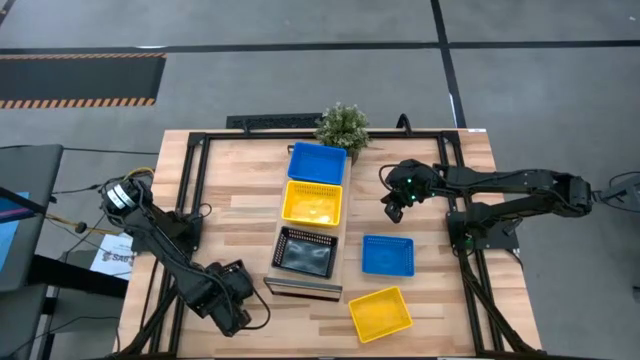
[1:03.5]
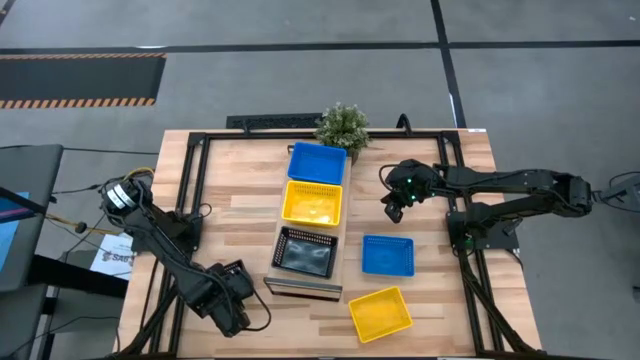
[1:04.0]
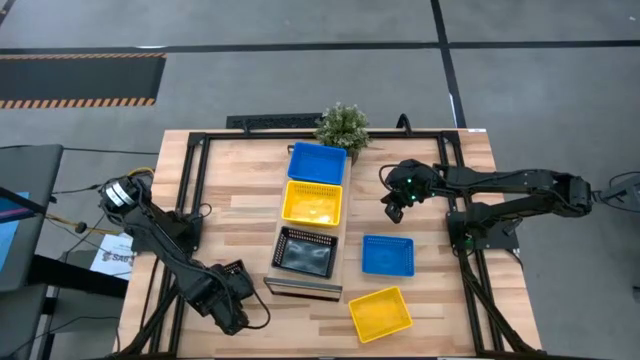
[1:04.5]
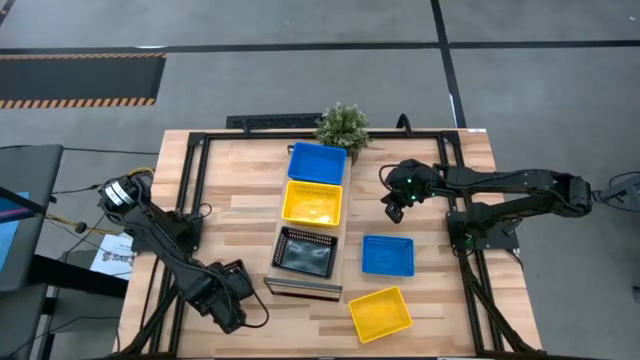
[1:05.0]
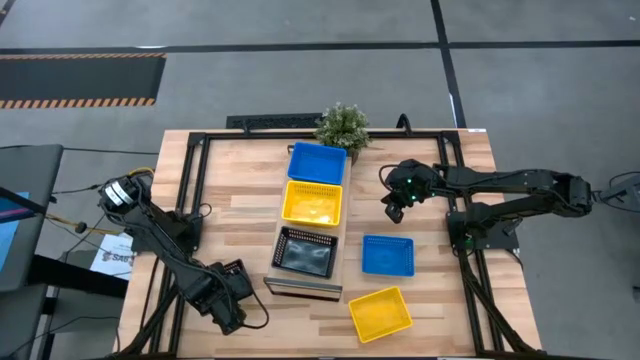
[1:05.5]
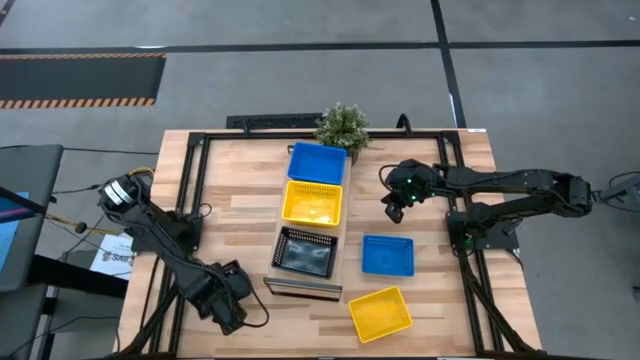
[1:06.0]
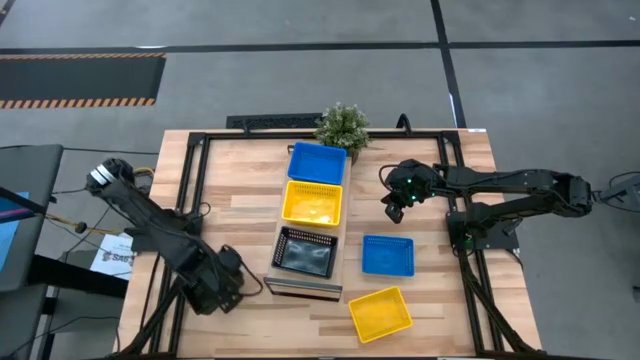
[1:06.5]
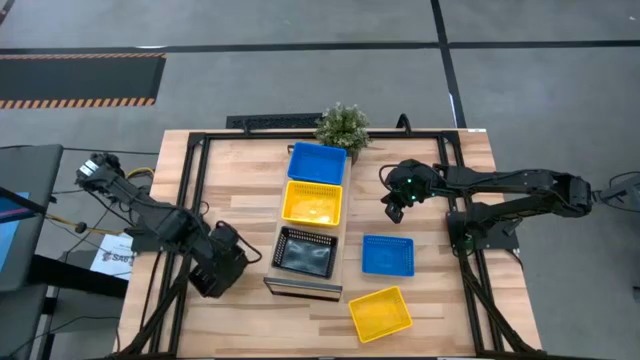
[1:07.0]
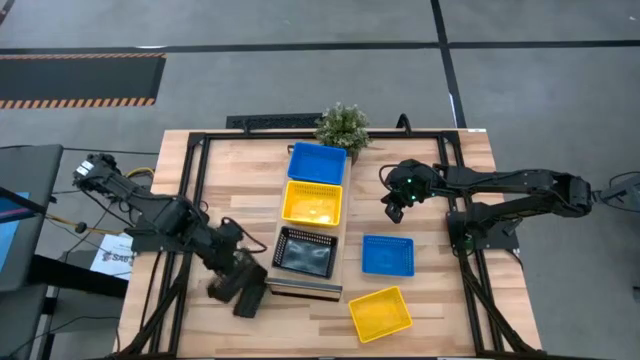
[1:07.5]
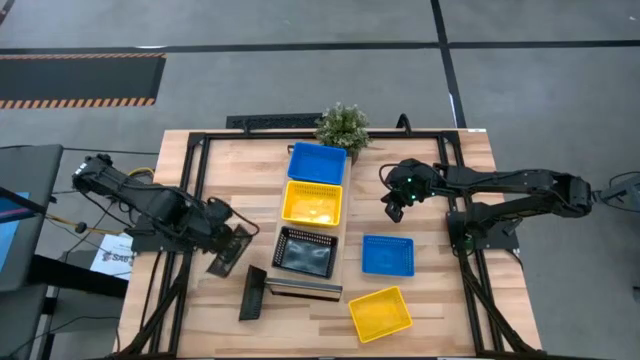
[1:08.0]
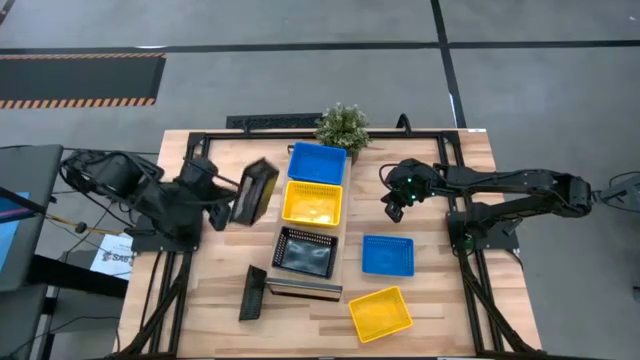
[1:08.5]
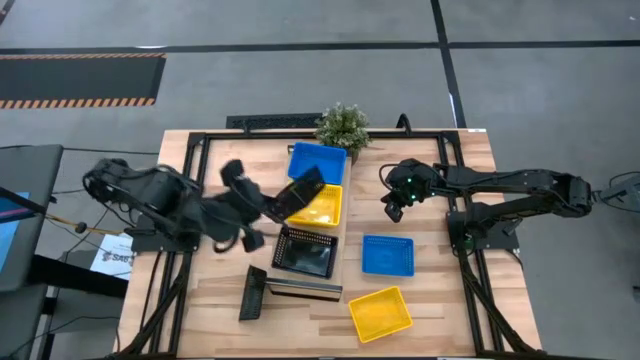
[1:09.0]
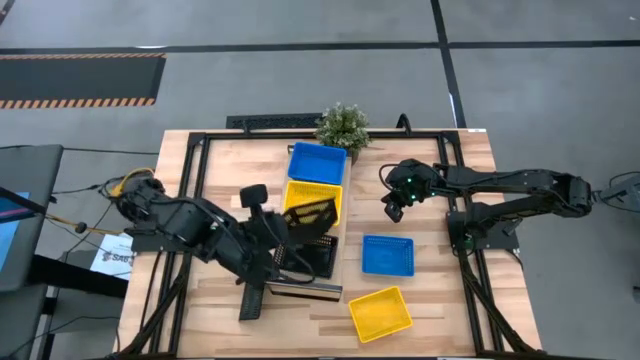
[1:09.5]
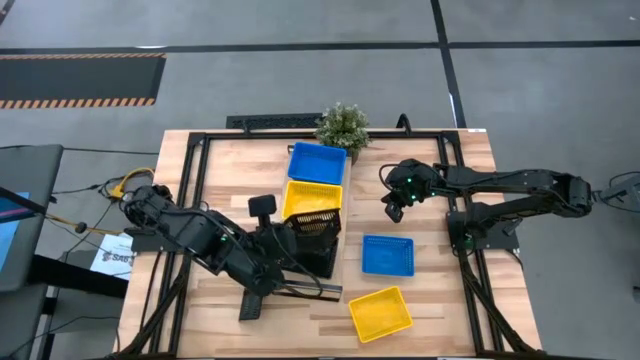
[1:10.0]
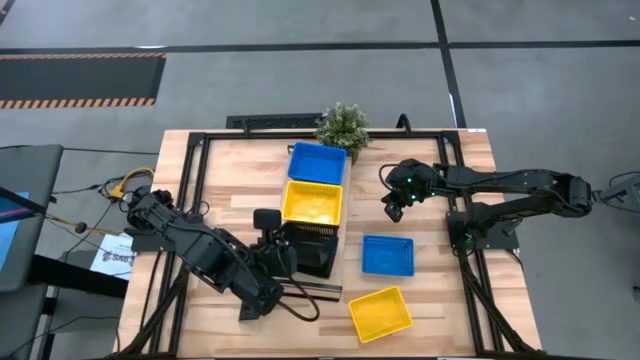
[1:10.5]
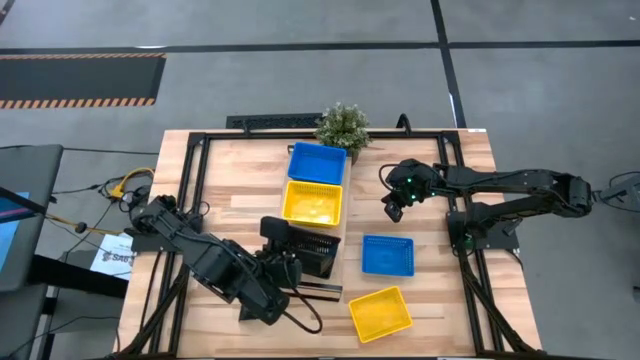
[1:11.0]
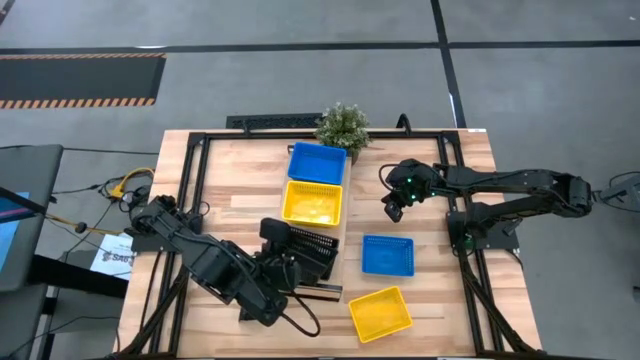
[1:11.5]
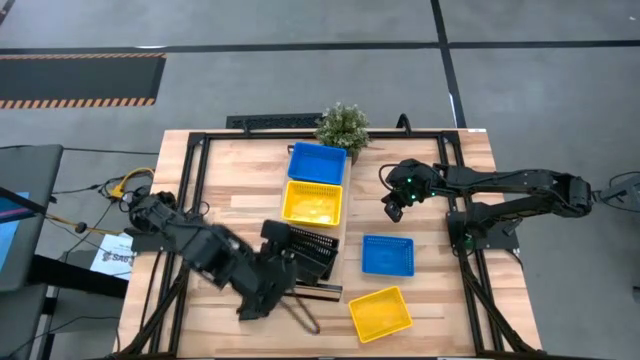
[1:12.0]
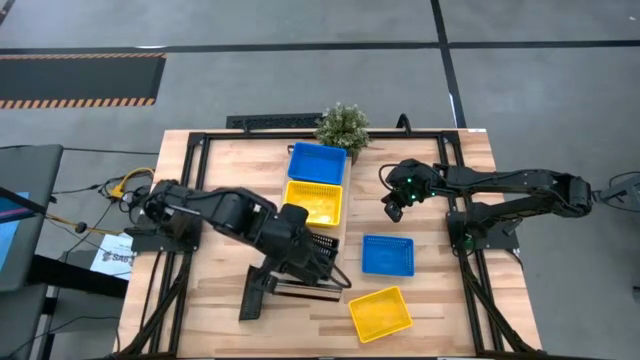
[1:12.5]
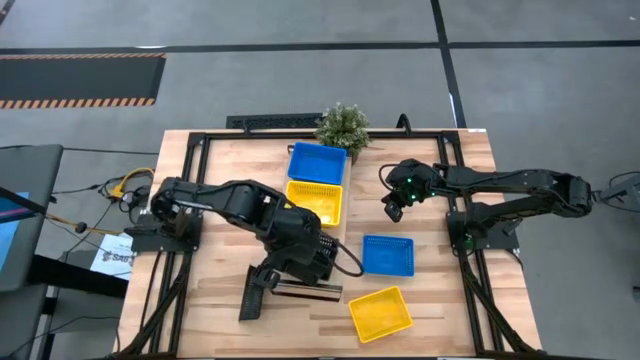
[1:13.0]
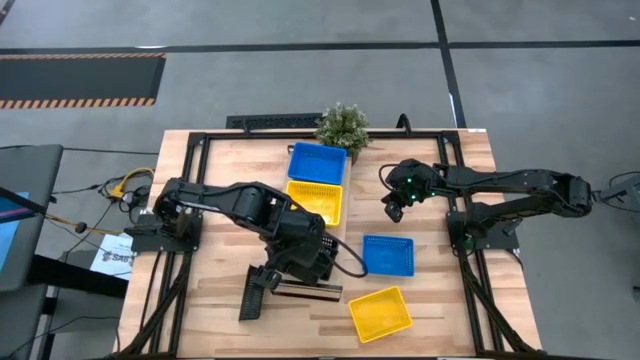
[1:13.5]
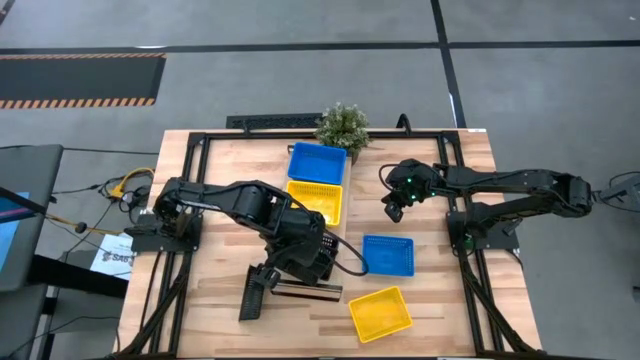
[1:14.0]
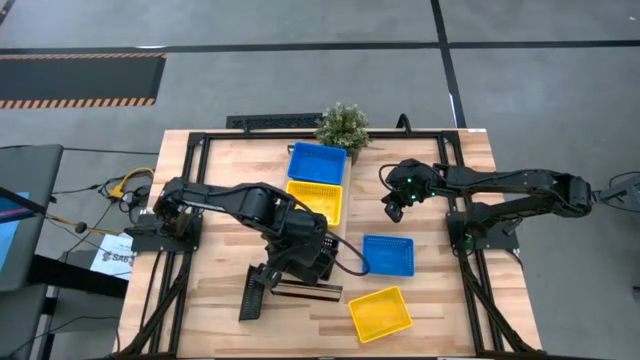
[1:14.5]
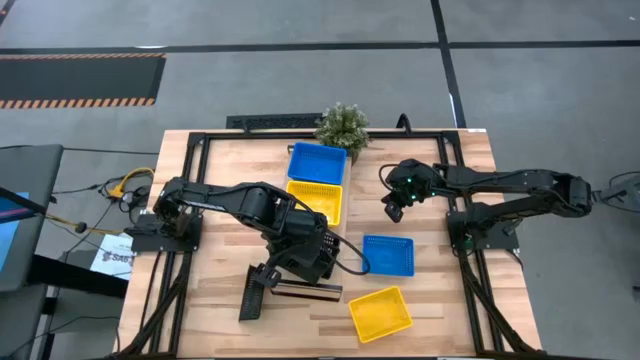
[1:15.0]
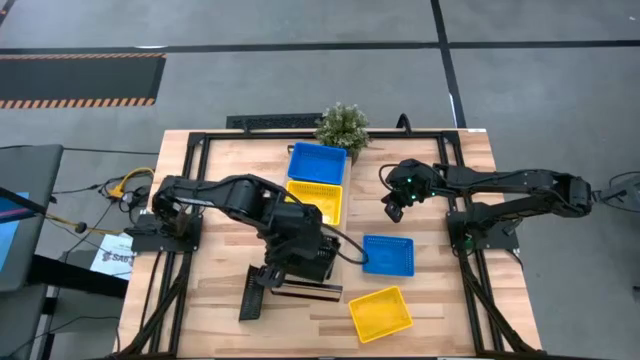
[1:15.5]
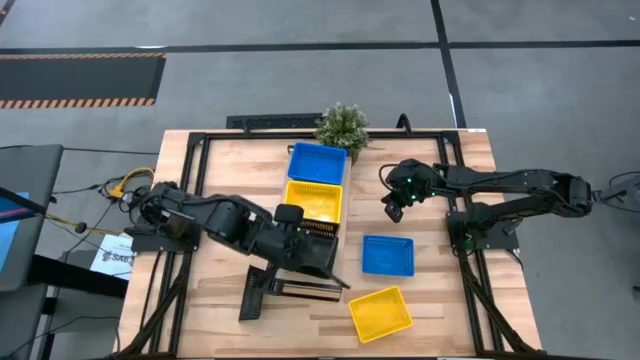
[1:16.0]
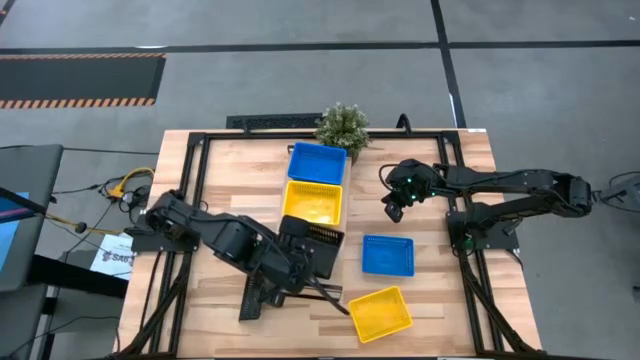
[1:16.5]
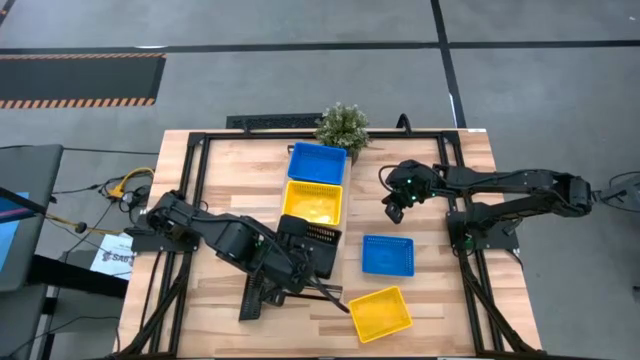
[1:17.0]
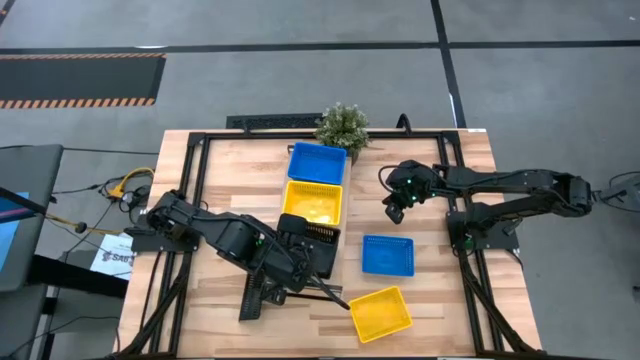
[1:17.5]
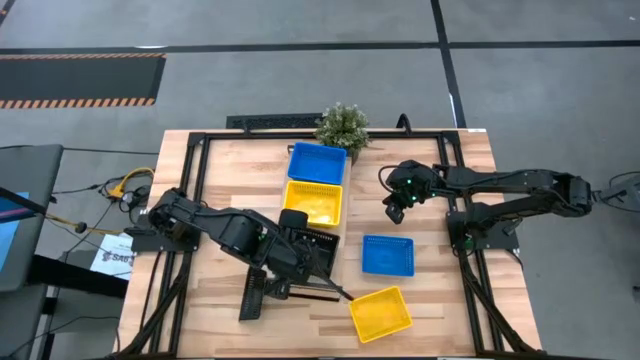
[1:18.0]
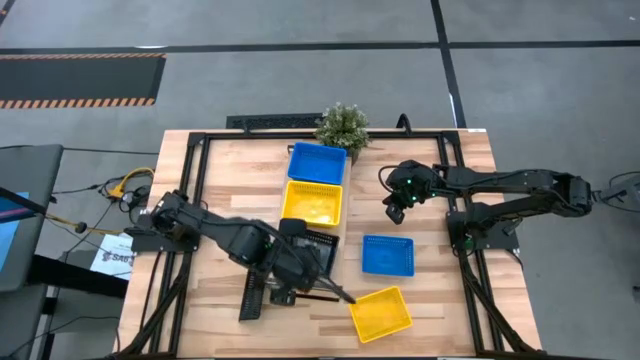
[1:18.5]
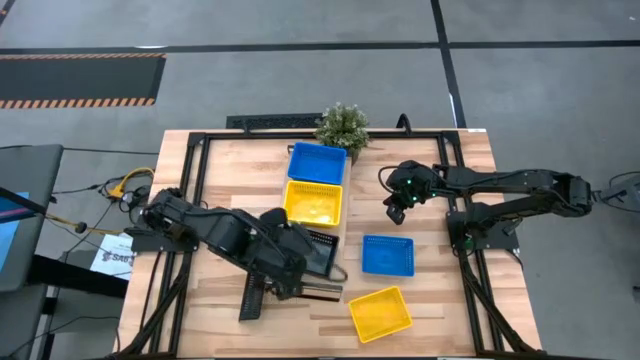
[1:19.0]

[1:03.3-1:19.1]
Task: Stack baskets on shelf by color
Stack the black basket on top of the black basket on the shelf

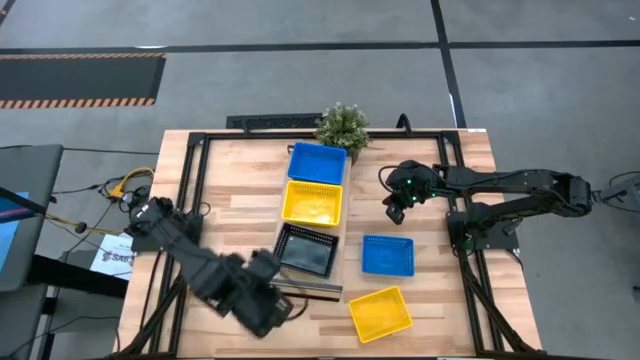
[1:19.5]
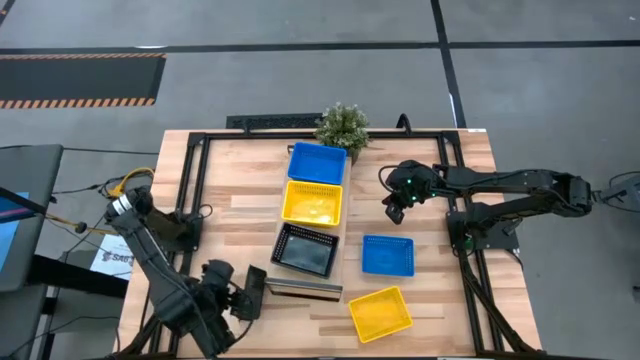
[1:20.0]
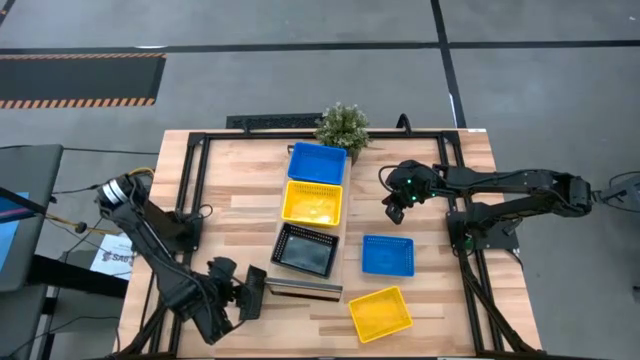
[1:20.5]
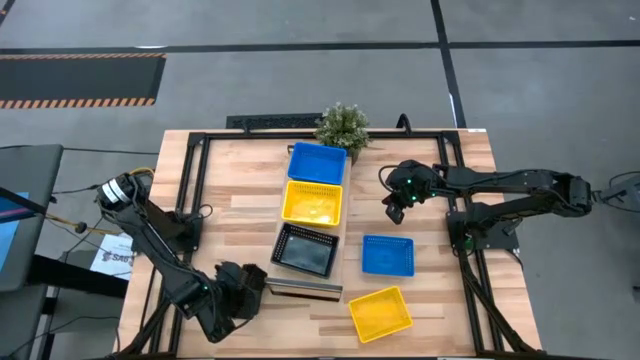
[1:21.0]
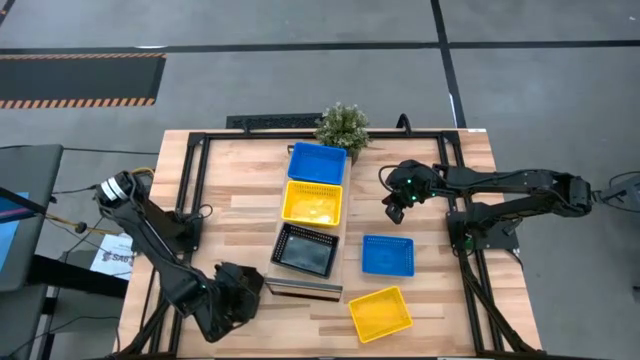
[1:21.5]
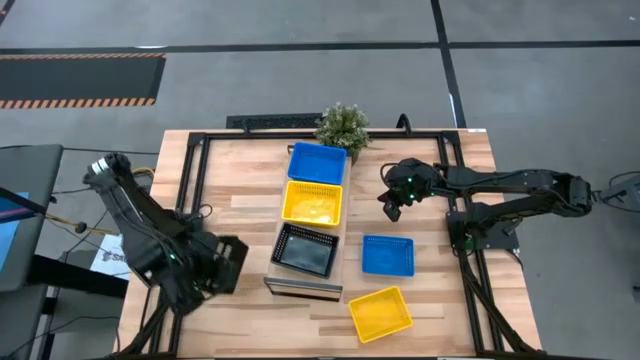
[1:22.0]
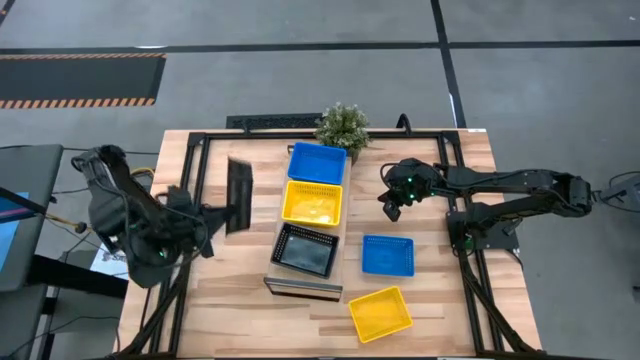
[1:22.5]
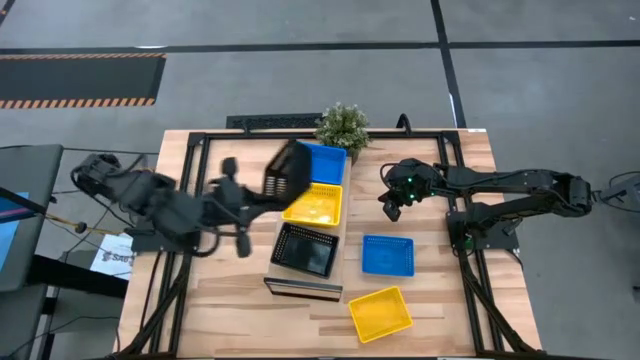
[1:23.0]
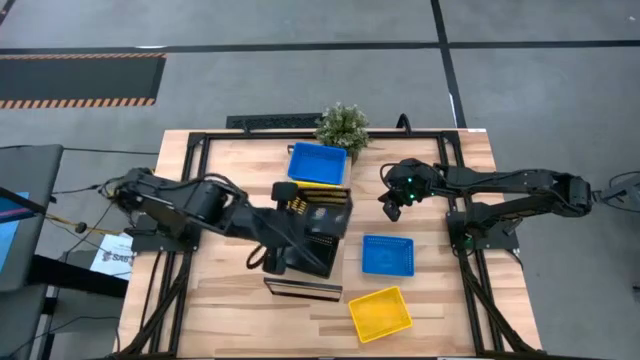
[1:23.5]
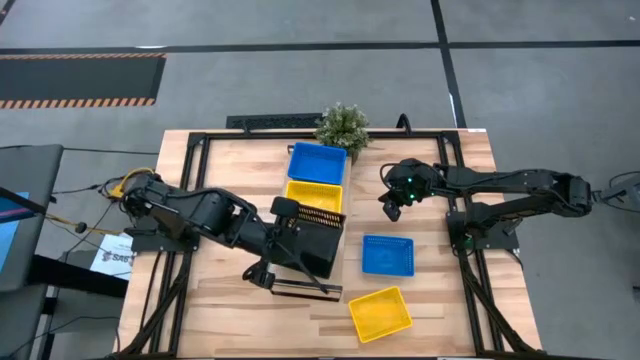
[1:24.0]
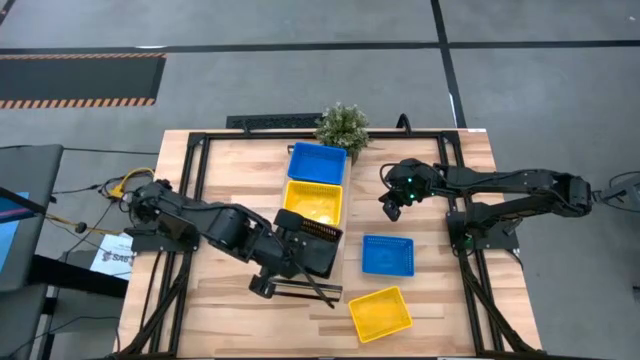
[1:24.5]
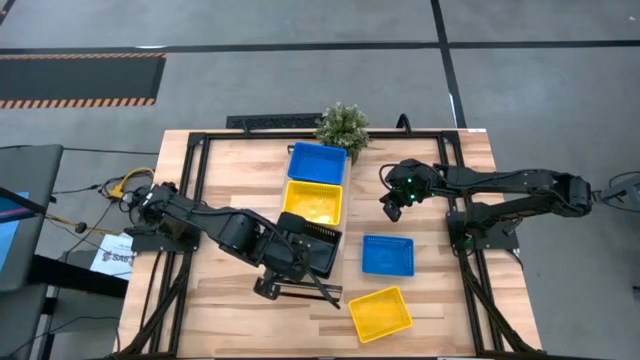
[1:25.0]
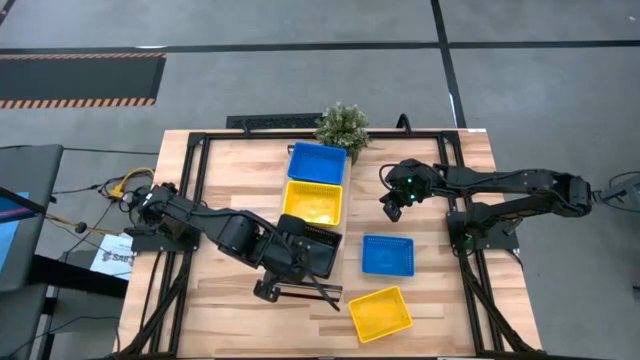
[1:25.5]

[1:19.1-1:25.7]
Stack the black basket on top of the black basket on the shelf
